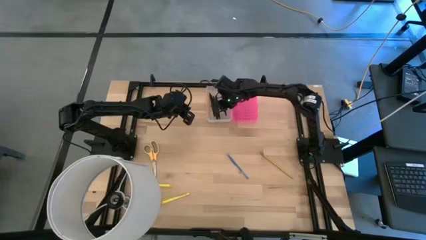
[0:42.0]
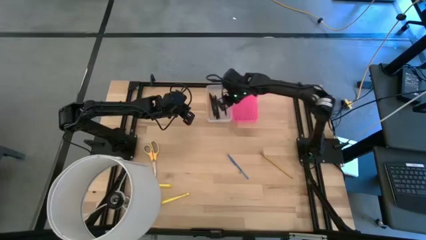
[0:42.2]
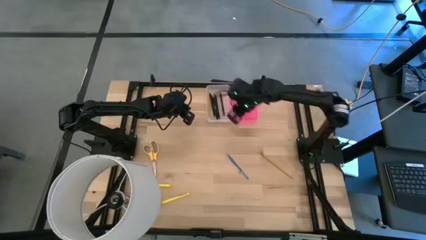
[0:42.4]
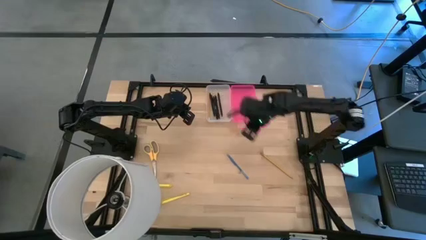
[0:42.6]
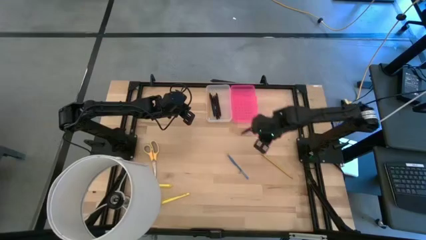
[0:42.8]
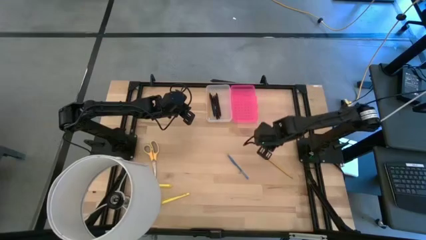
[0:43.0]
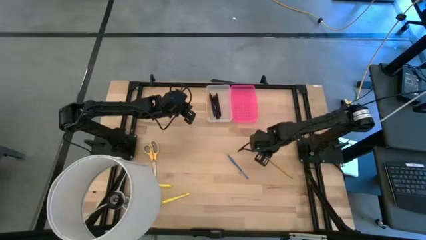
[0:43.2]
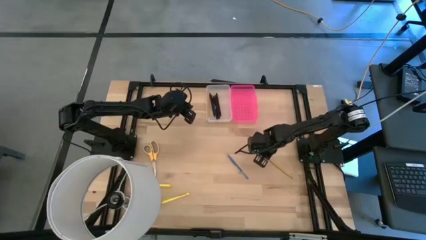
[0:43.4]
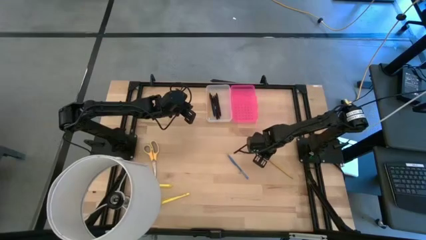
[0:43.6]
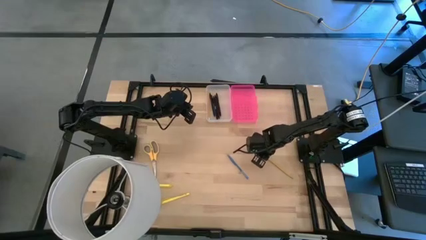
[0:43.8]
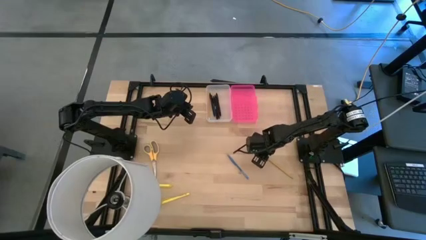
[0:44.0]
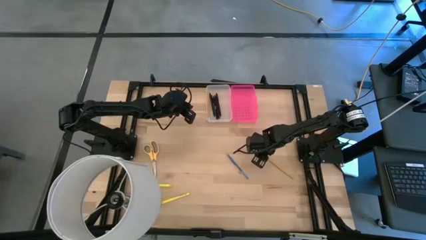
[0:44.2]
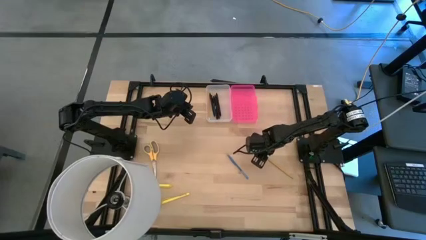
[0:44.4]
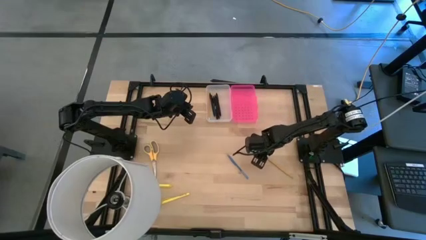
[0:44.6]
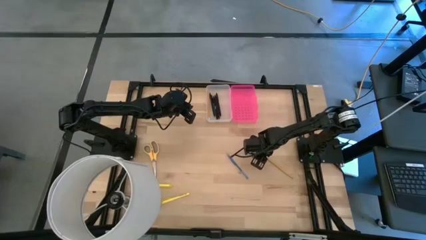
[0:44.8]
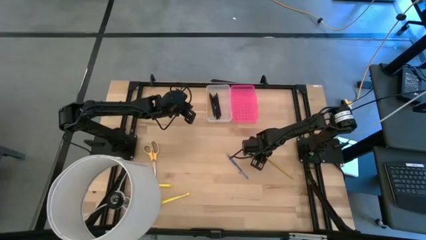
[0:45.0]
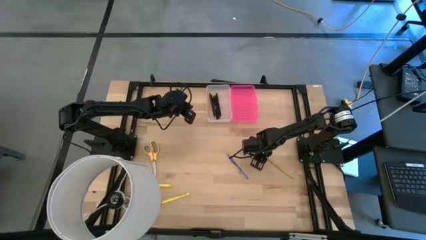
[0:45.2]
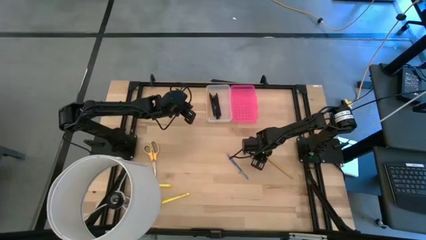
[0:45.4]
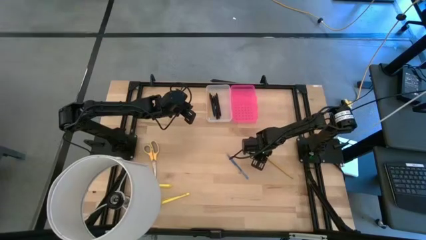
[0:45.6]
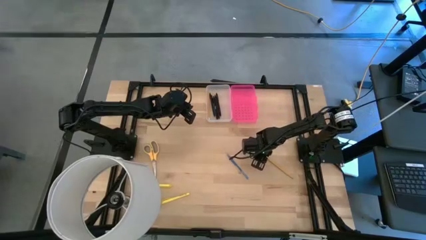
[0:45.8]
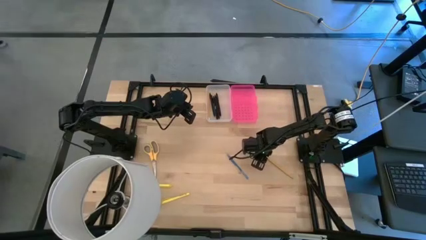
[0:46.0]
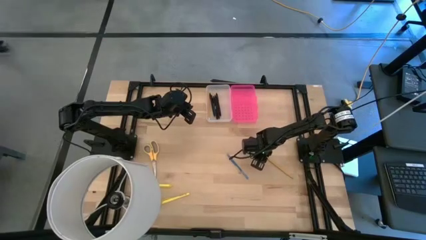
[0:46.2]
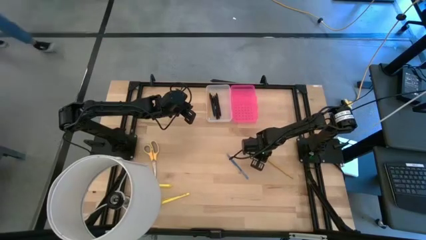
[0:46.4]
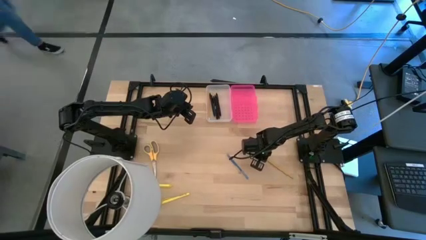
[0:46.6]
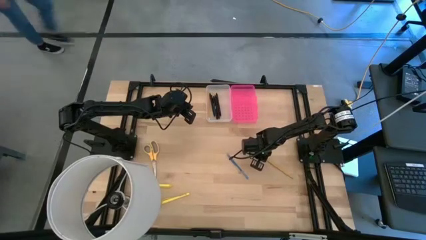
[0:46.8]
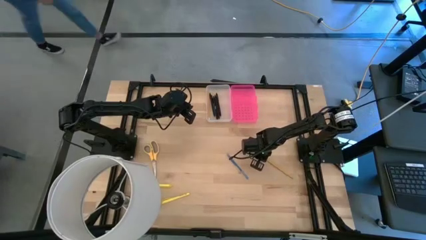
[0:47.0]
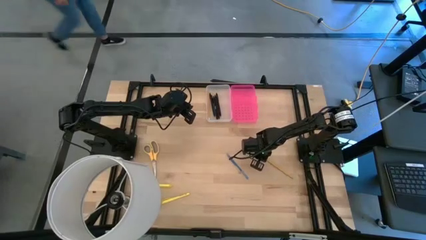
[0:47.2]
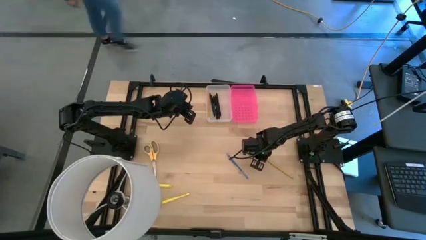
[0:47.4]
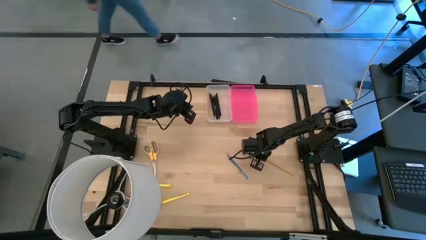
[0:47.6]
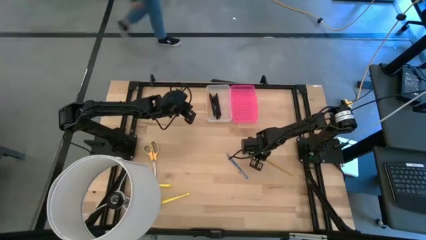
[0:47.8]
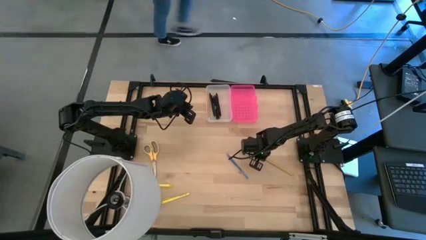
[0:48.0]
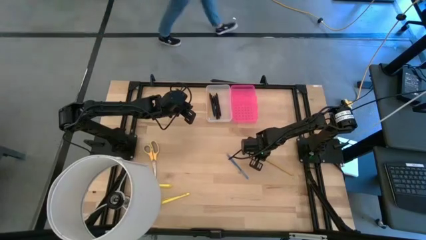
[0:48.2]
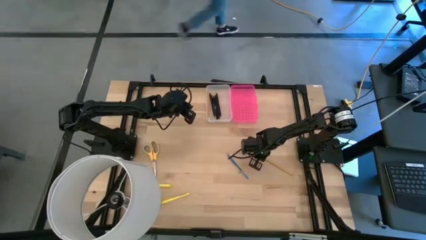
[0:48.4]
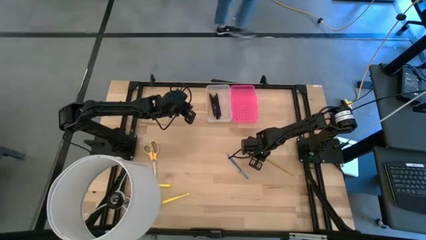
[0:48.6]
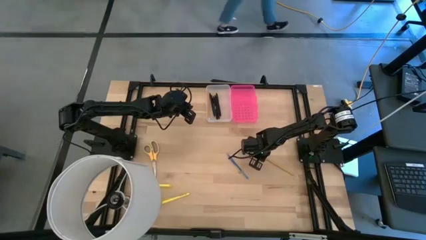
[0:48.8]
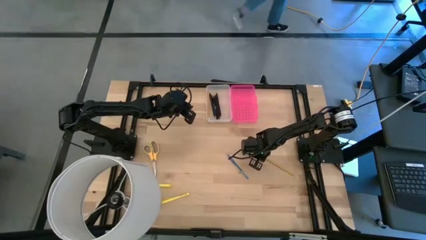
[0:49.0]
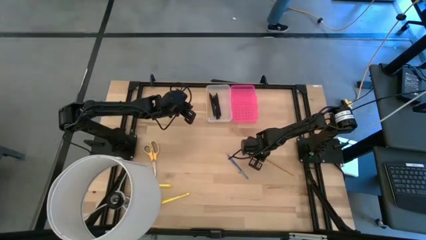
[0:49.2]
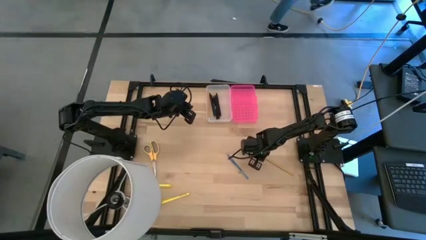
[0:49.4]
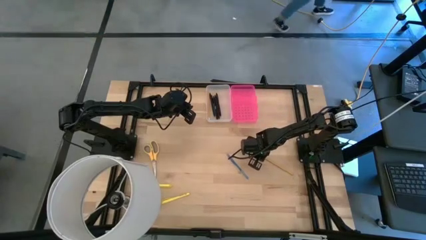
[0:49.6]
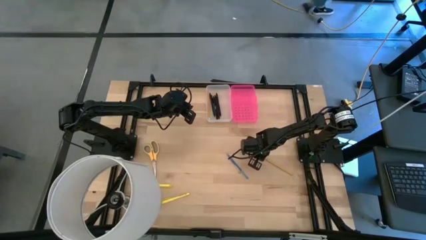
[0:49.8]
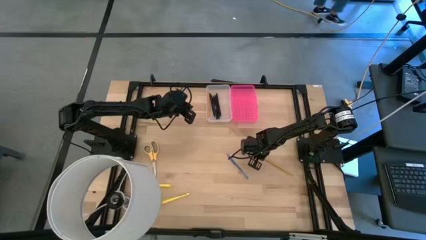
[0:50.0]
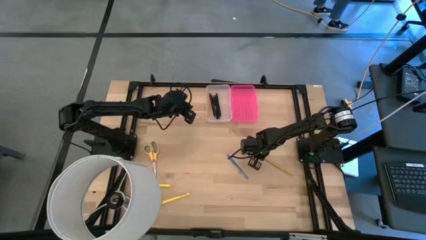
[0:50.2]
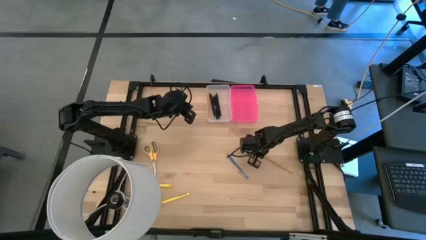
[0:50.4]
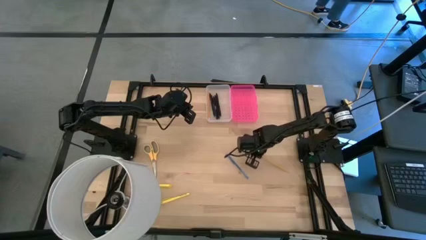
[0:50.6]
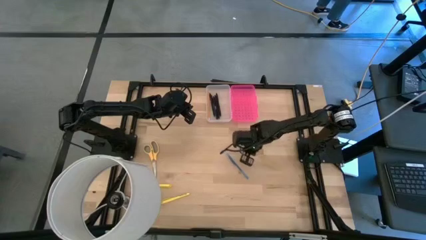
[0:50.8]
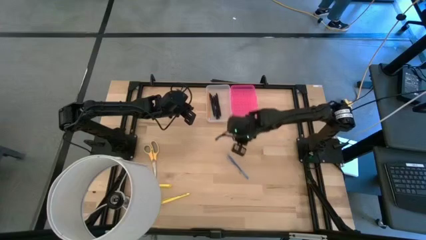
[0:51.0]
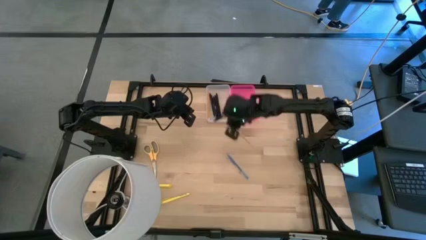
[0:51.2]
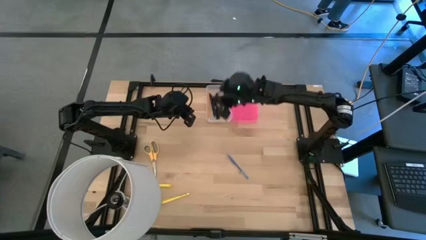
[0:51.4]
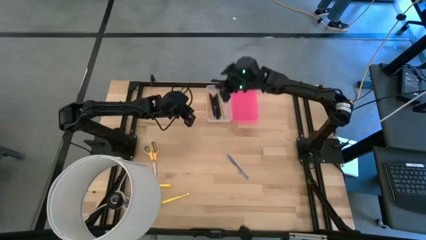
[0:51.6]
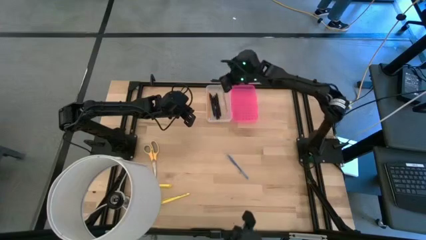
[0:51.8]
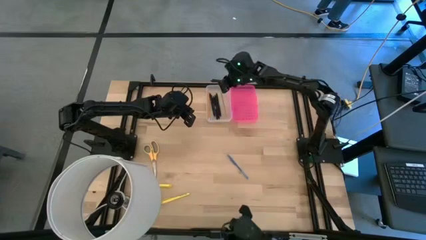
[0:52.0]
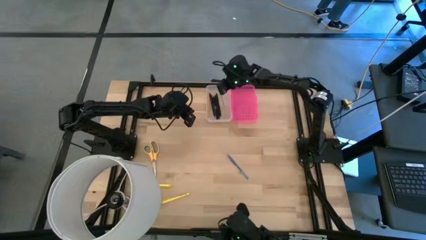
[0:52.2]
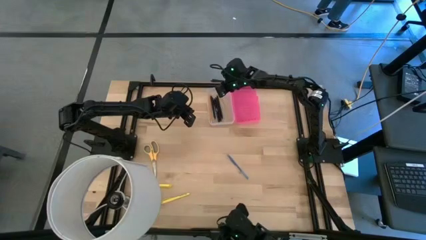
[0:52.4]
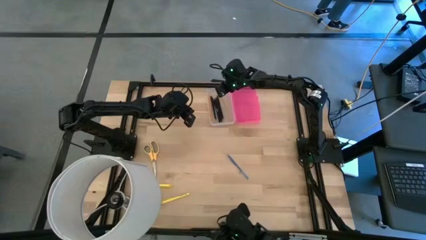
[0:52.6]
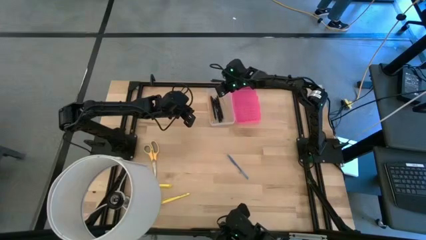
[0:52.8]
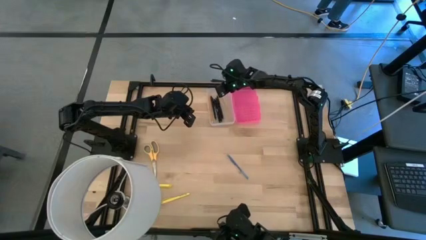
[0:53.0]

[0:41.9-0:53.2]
Task: Pick & place school supplies into a supply box
Put the yellow pencil into the transparent supply box

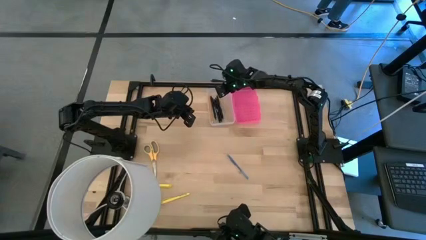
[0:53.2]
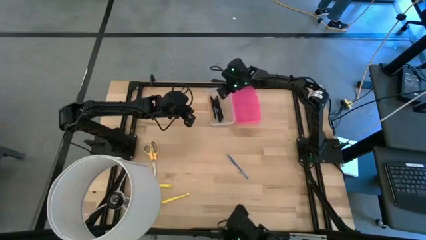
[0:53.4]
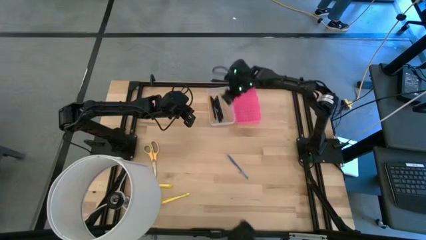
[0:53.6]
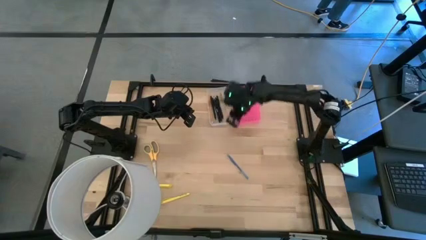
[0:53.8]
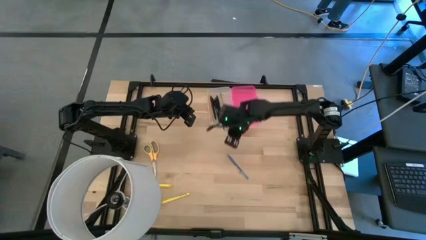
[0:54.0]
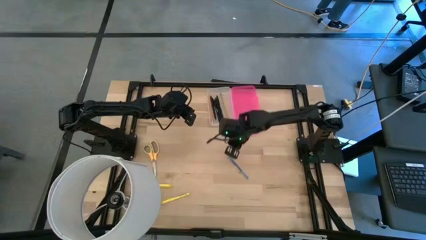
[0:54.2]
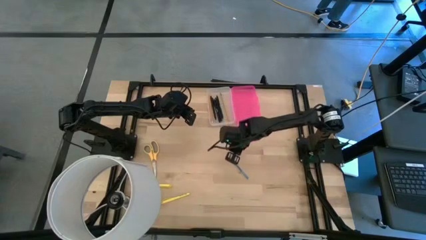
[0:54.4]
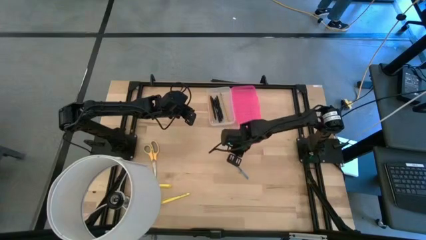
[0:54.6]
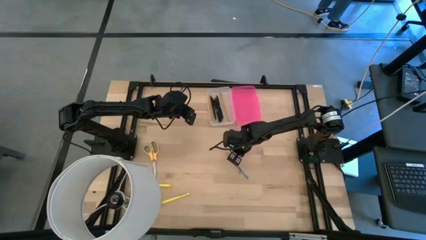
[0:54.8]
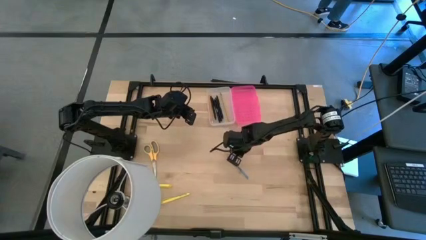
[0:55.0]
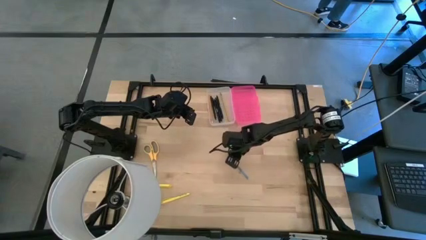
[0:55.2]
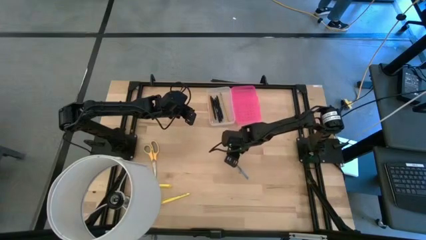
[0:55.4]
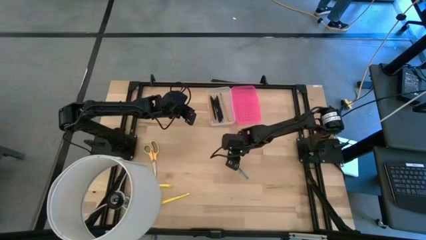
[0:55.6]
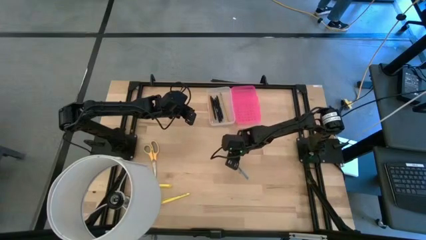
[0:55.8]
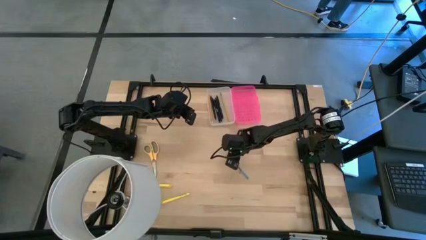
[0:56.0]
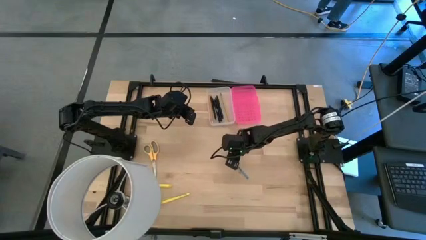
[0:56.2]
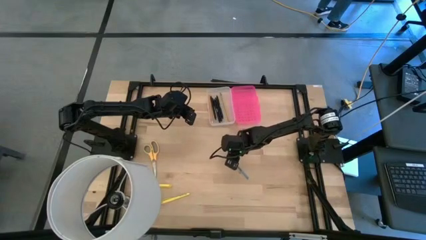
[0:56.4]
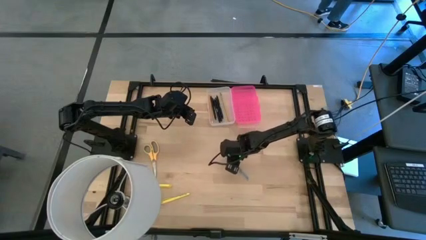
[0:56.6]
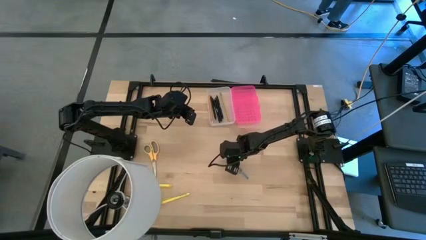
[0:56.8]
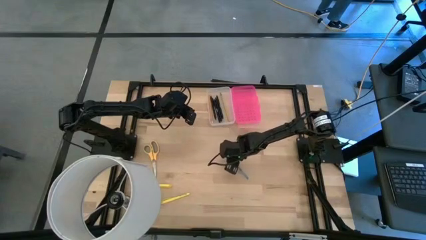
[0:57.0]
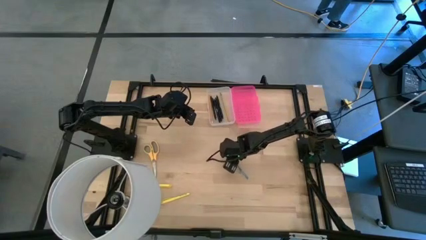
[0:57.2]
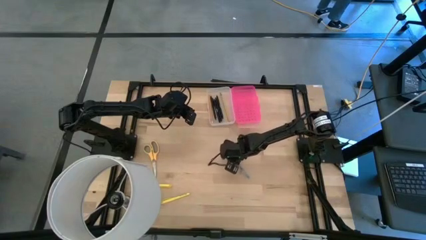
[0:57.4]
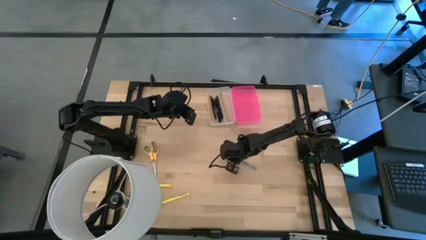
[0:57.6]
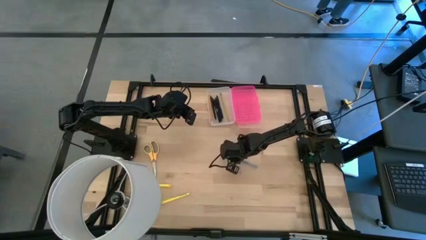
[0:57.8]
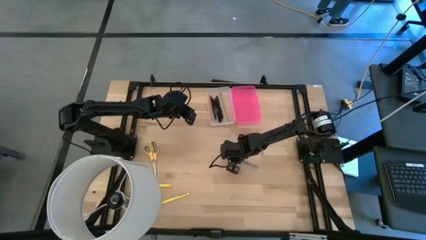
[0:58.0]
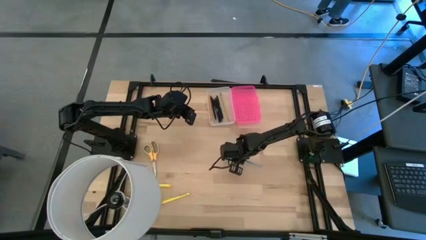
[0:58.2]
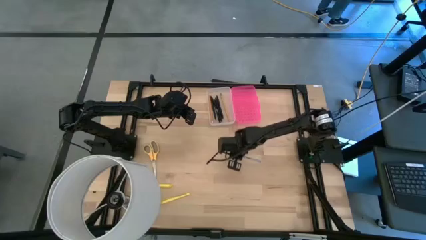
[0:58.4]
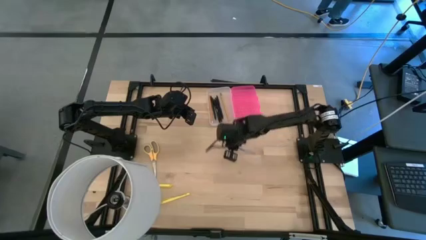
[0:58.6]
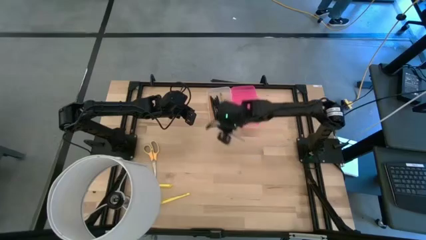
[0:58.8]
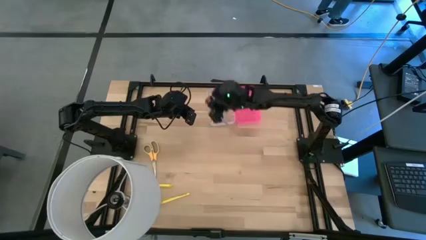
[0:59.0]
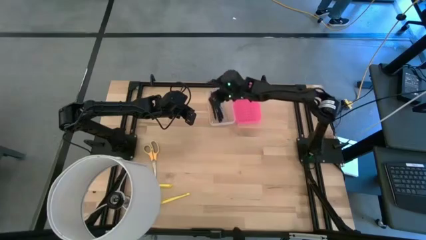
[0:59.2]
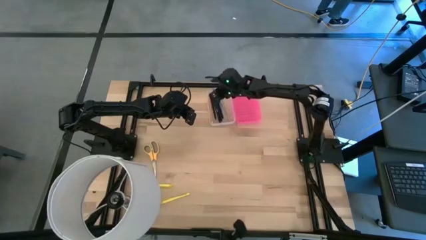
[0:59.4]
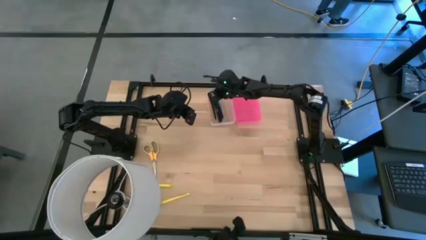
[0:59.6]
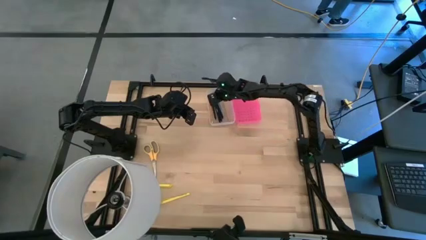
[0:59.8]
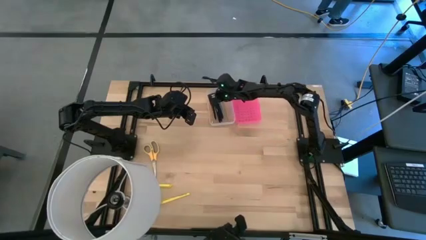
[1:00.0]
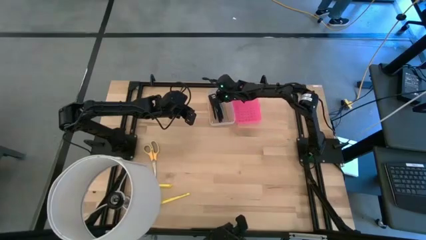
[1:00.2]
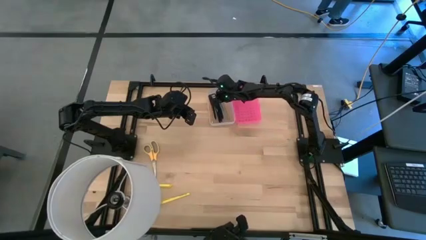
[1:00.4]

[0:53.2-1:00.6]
Put the blue pen into the transparent supply box
